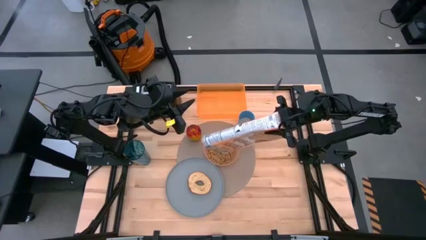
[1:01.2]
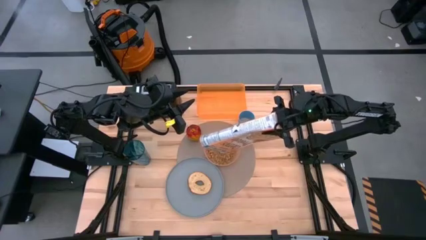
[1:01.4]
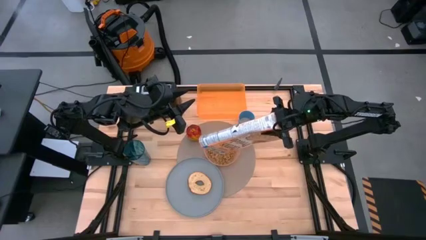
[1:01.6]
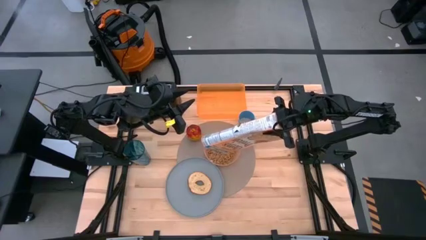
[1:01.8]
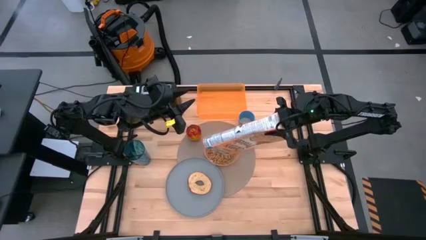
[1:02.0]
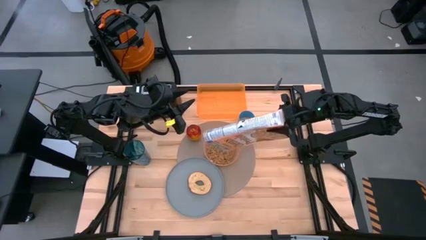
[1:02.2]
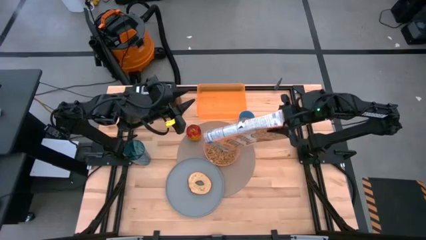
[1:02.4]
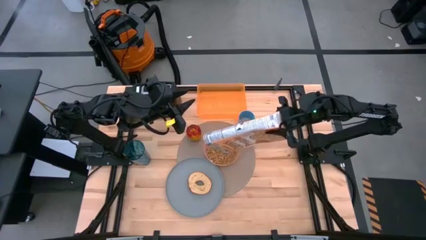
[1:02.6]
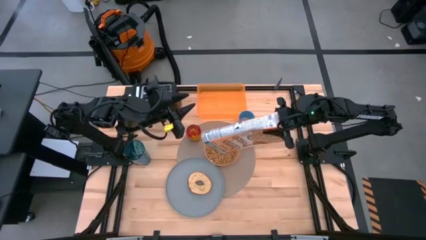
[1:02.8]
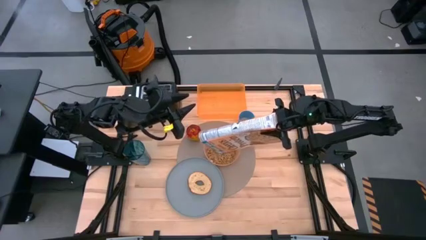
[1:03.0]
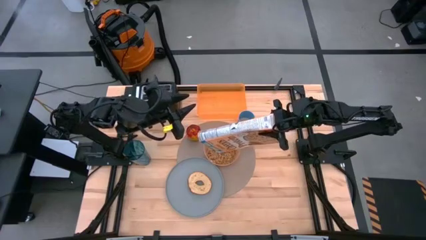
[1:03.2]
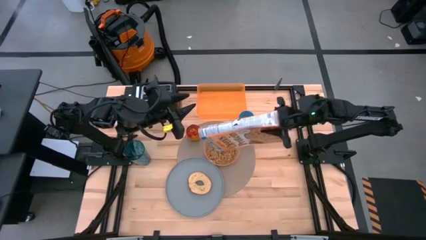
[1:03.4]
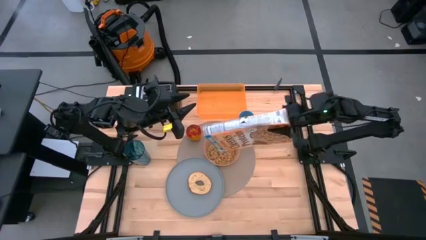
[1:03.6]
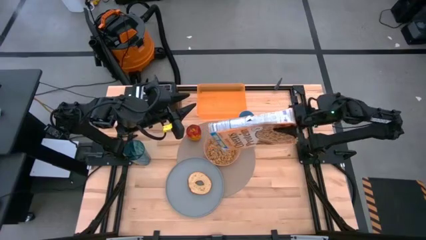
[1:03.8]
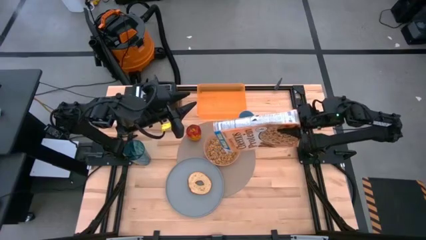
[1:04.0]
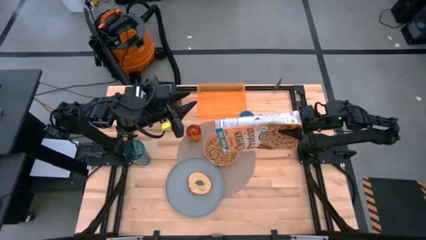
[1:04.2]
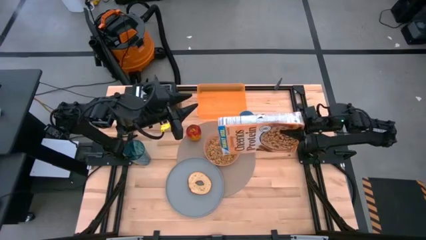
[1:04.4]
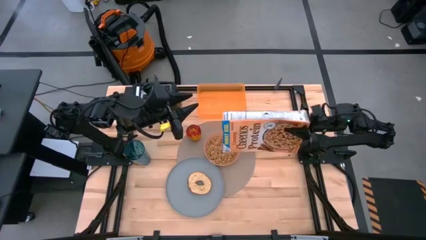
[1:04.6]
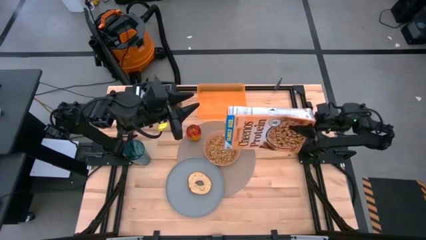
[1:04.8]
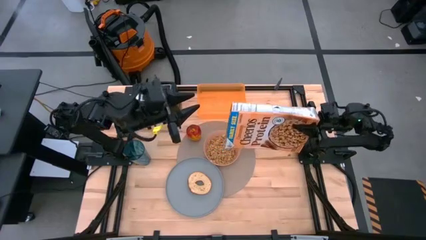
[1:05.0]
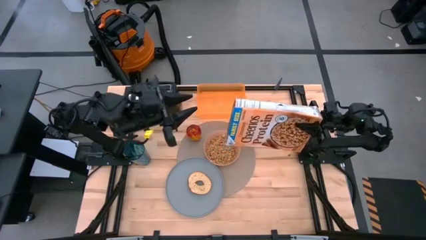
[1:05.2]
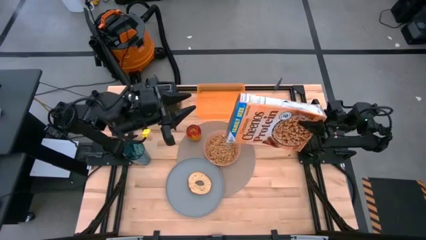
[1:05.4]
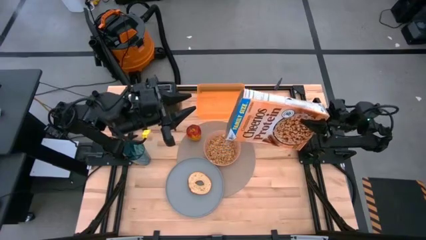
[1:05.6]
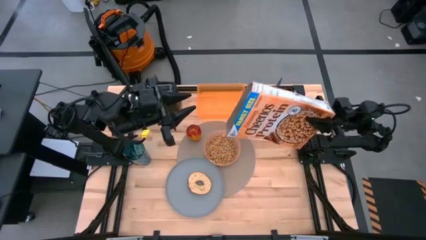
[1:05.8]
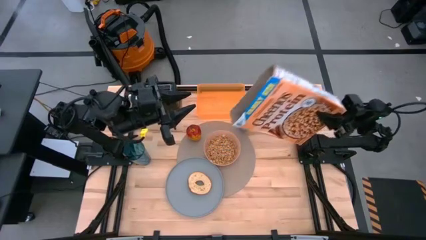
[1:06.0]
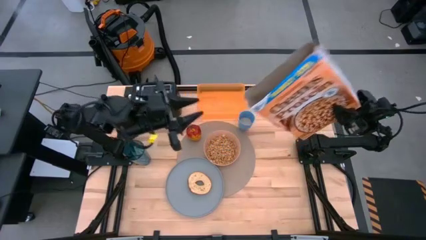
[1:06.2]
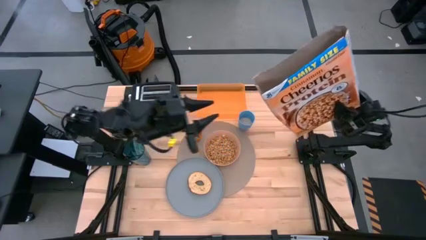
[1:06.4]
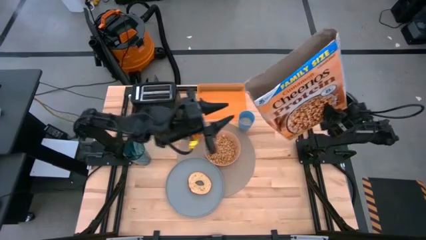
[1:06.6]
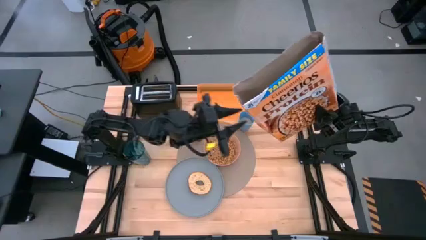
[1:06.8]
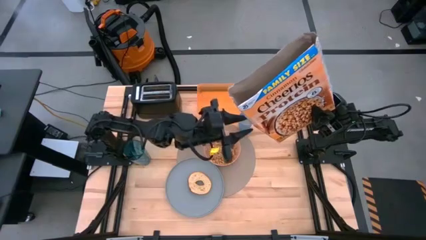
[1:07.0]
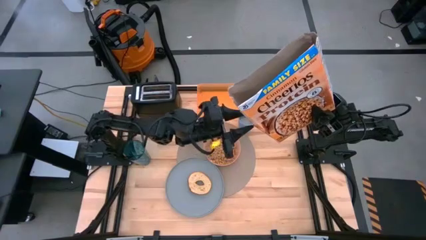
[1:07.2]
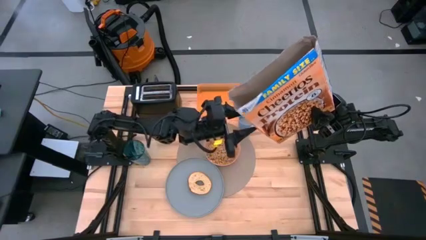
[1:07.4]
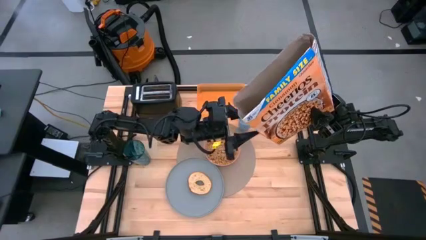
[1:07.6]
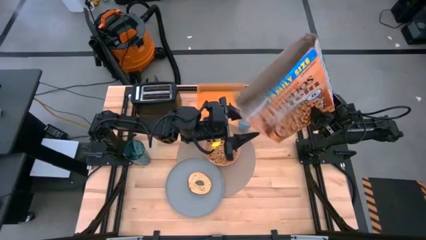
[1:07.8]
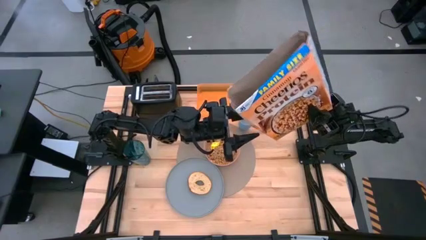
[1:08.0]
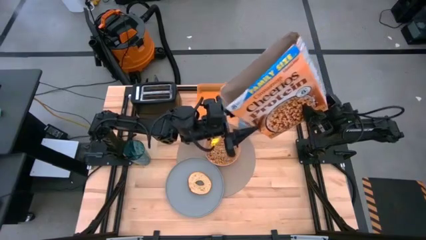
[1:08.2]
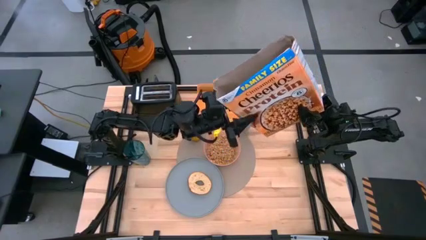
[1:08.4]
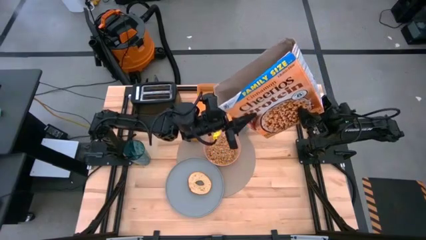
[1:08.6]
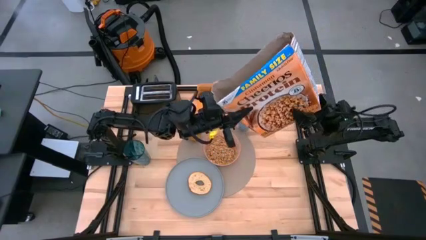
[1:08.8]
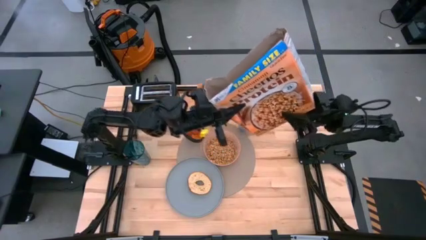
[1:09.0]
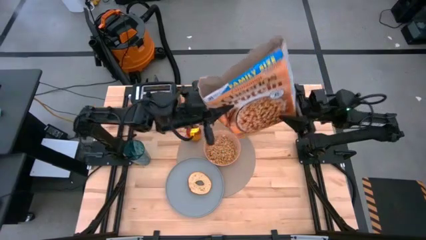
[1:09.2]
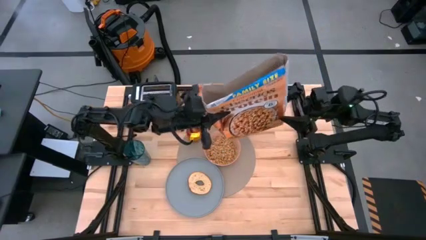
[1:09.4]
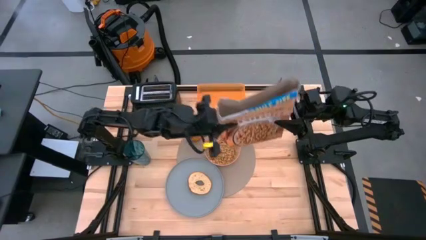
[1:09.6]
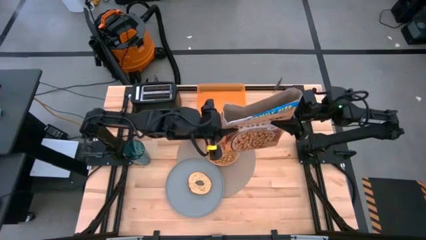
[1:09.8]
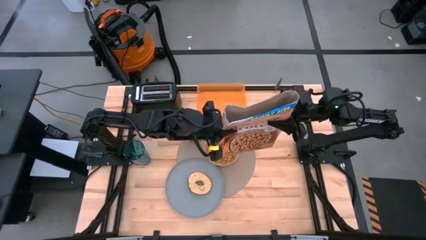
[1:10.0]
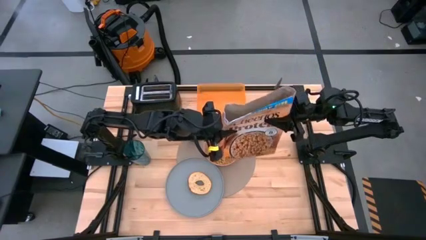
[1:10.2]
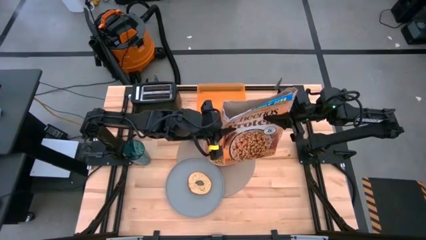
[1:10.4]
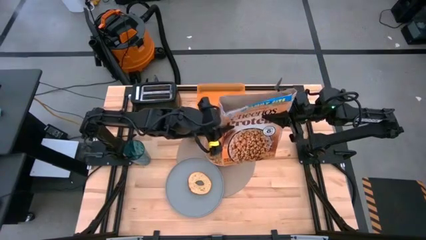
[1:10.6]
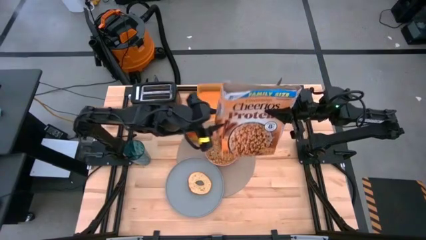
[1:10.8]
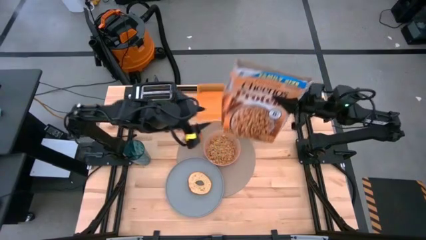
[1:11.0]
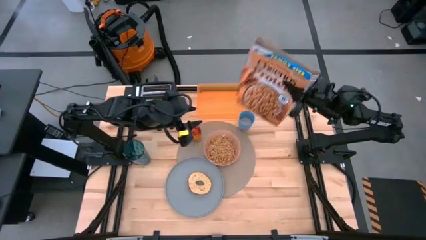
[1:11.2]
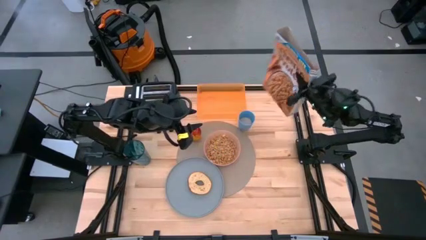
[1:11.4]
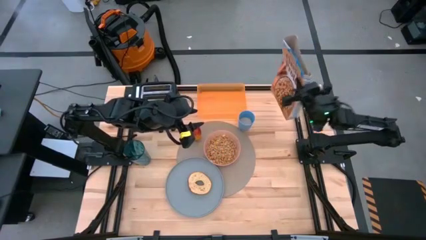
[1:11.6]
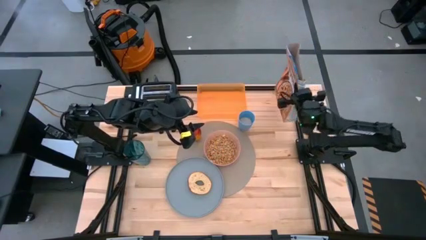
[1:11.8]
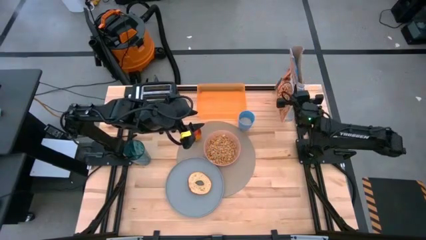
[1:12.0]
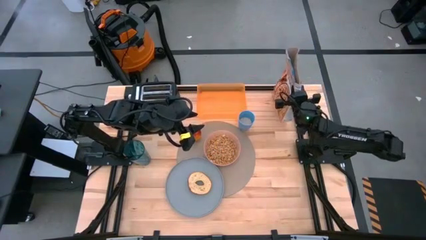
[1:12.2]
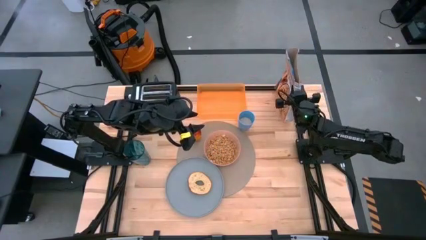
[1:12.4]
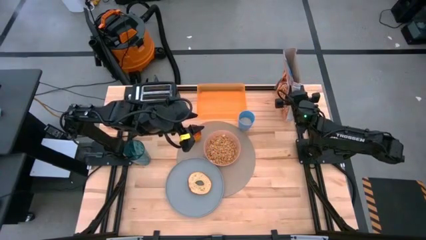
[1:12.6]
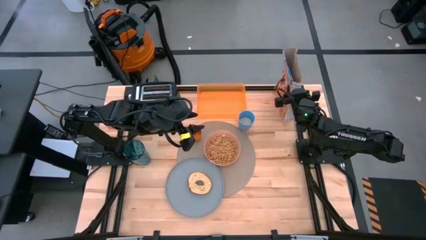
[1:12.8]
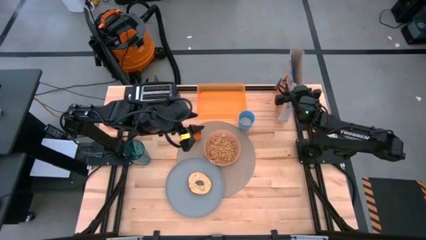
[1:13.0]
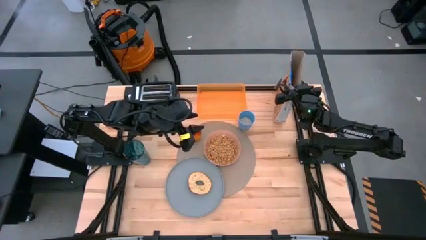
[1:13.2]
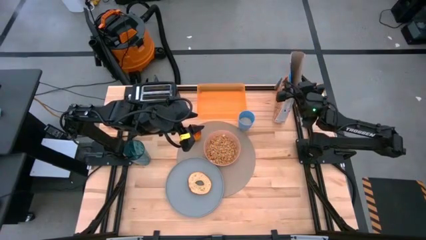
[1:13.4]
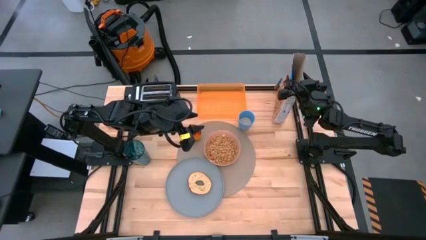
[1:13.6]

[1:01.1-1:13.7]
Task: Arrange a breakfast setting
Pour the cereal from the orange cereal box into the pink bowl

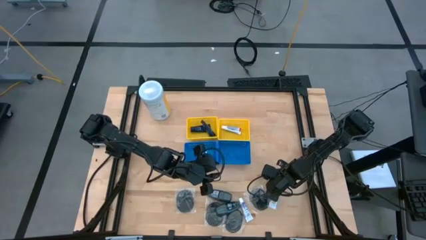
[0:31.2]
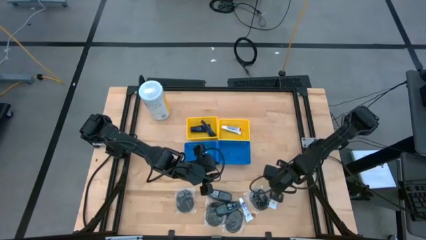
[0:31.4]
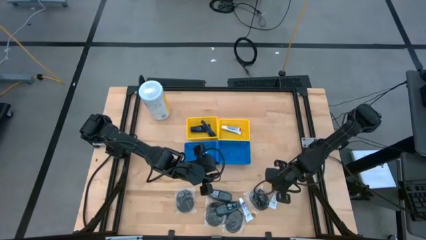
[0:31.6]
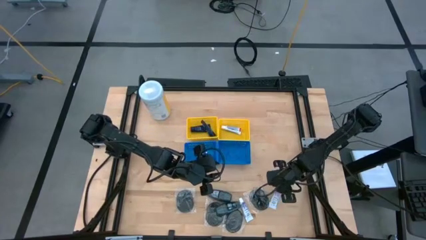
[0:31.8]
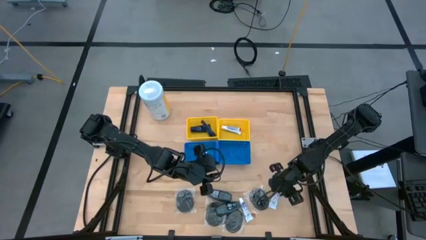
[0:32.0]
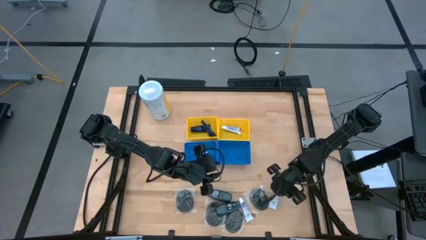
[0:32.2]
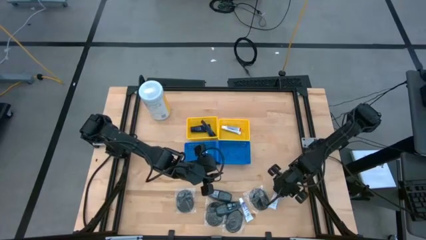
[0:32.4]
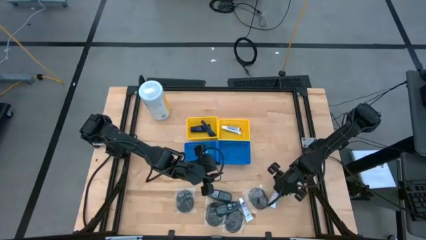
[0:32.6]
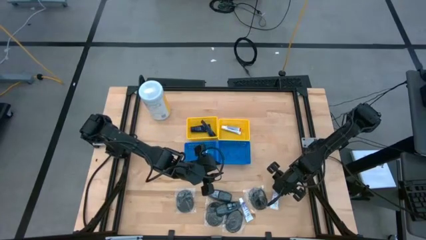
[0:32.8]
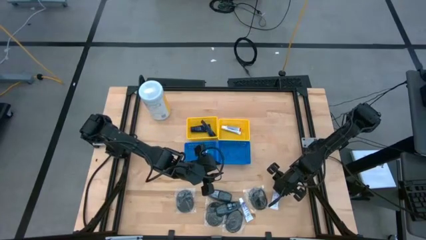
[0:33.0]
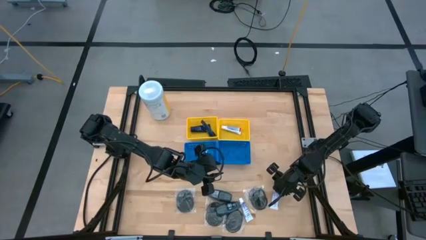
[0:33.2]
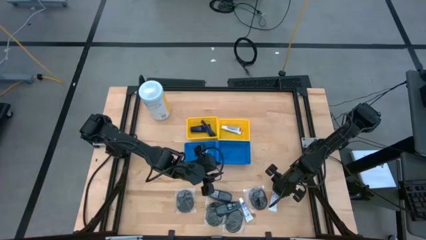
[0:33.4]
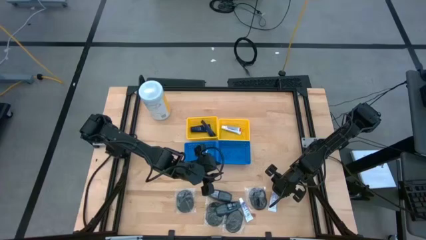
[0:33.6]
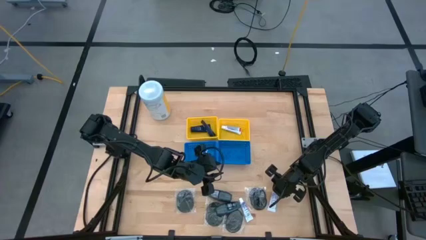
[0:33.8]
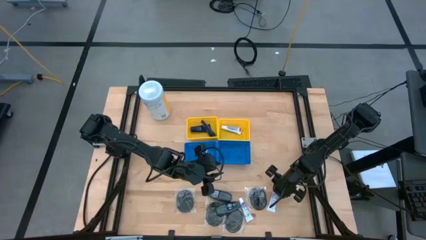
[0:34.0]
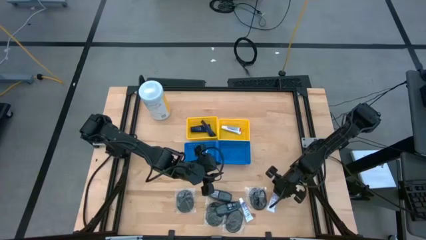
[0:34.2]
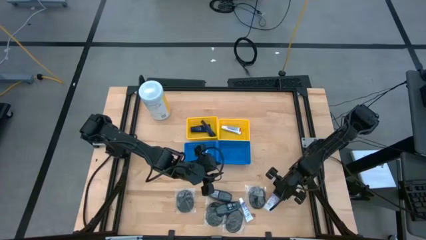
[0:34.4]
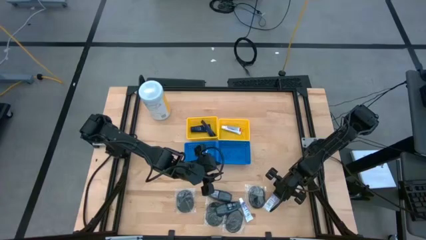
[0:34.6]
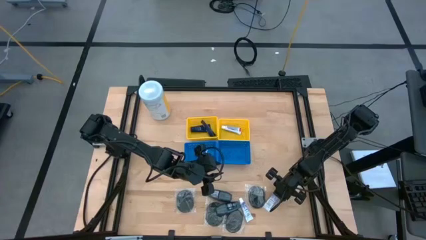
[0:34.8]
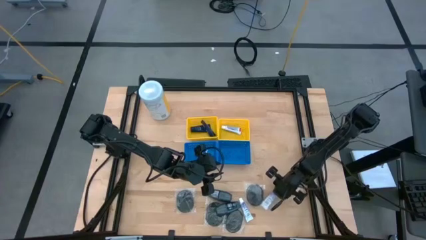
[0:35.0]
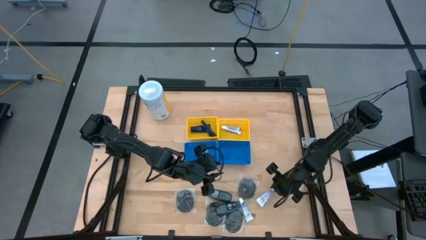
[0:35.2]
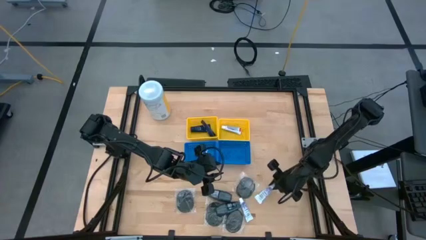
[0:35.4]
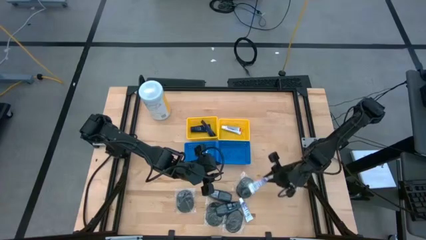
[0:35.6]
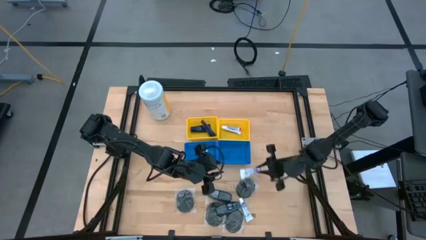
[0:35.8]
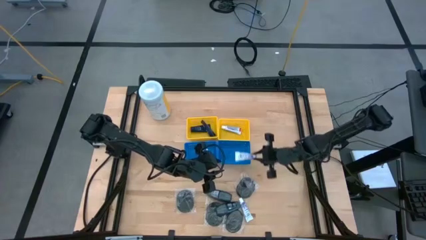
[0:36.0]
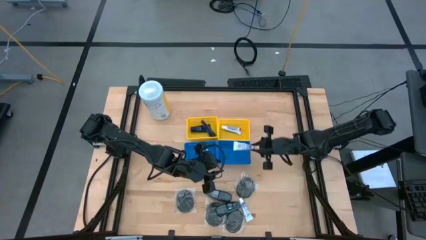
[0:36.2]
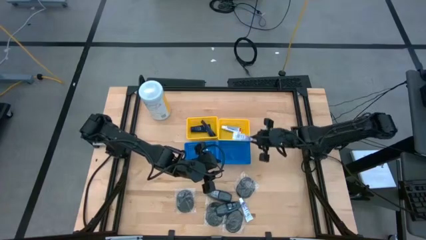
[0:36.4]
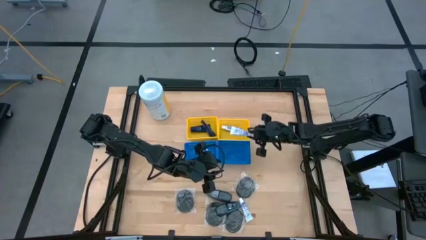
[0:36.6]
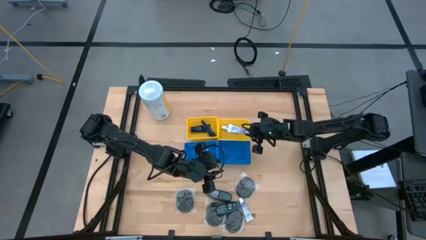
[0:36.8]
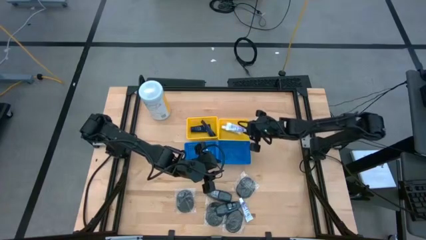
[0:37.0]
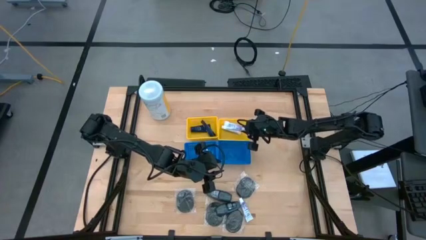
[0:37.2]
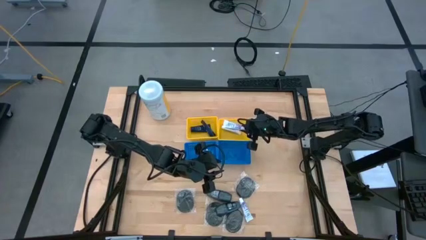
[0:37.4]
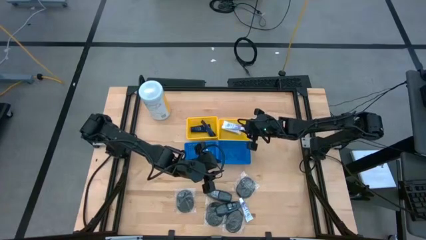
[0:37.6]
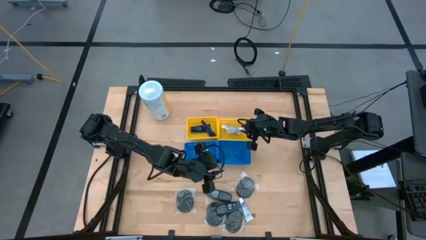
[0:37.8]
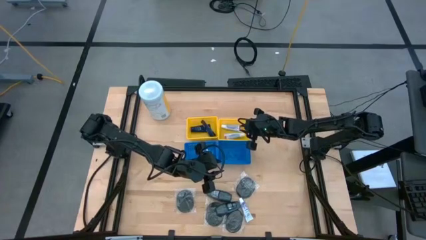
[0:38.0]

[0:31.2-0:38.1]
Task: Pick & Place Travel size toiletries
Put the right toothpaste into the right yellow bin
